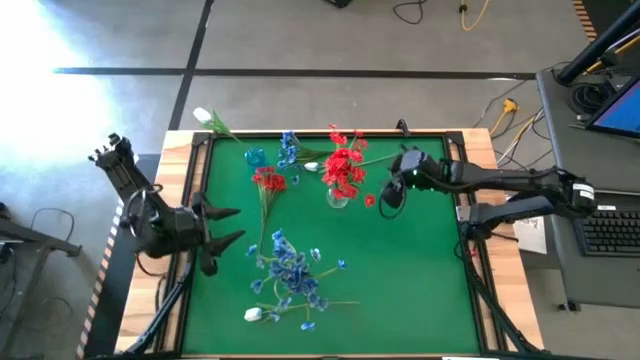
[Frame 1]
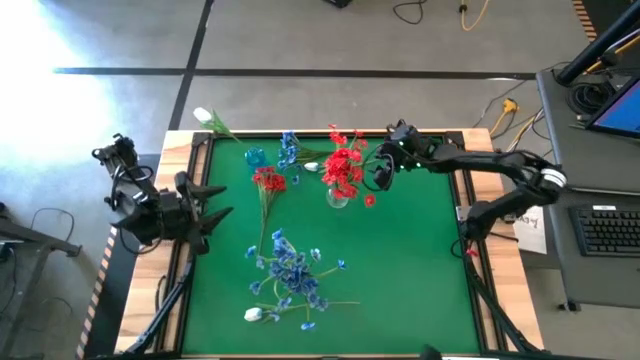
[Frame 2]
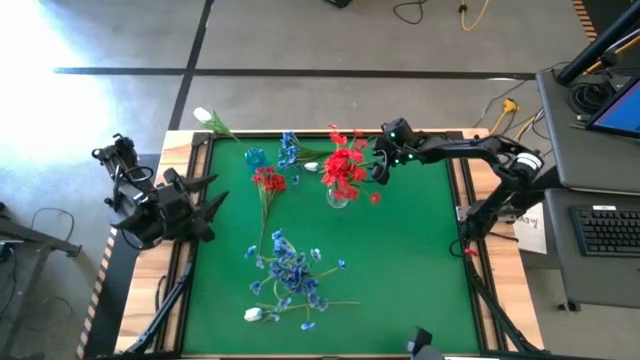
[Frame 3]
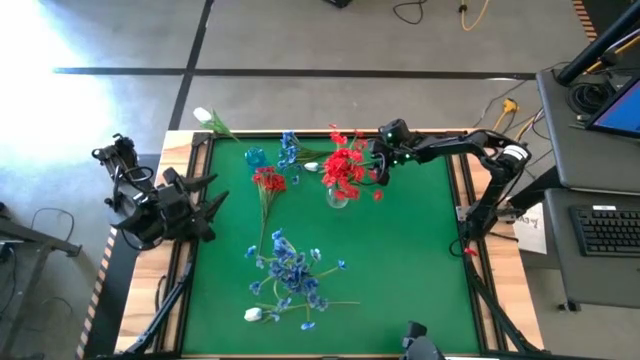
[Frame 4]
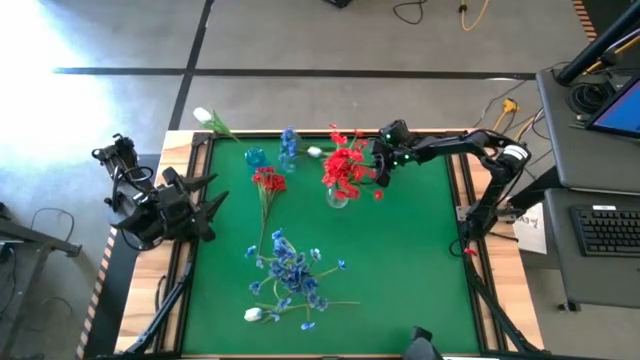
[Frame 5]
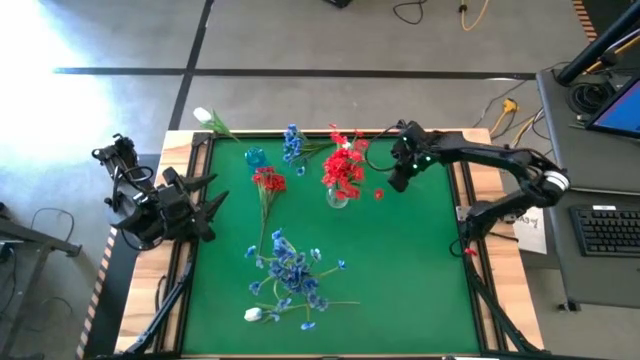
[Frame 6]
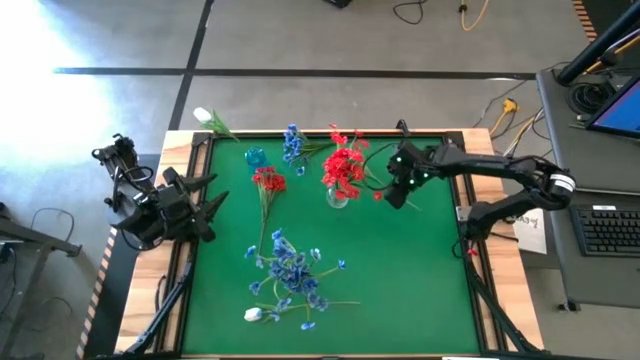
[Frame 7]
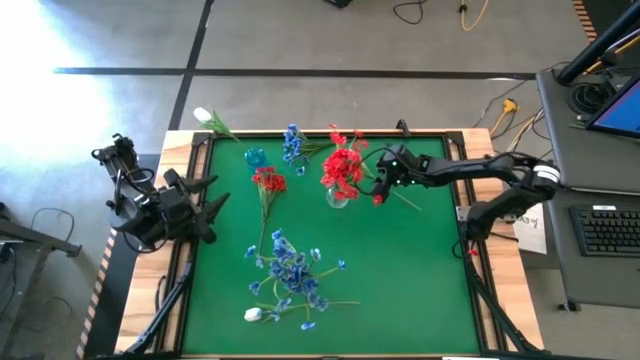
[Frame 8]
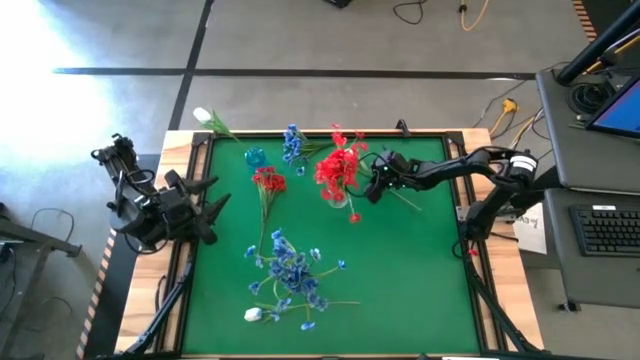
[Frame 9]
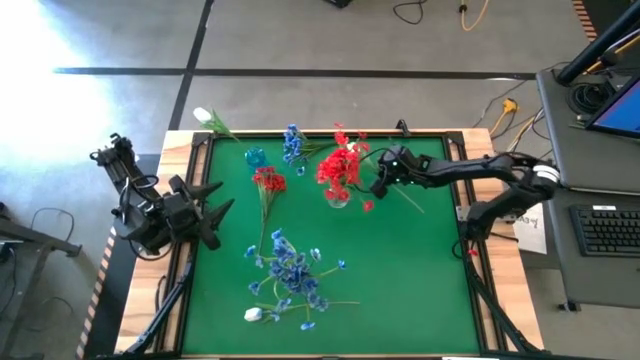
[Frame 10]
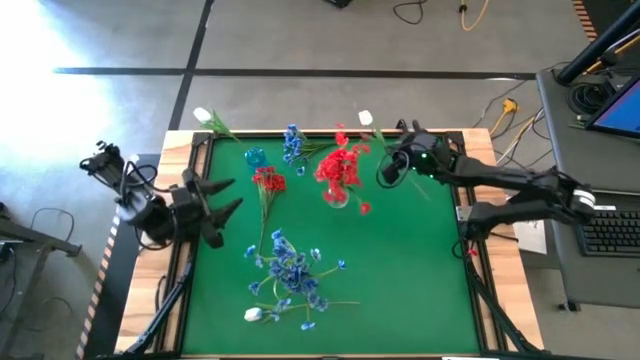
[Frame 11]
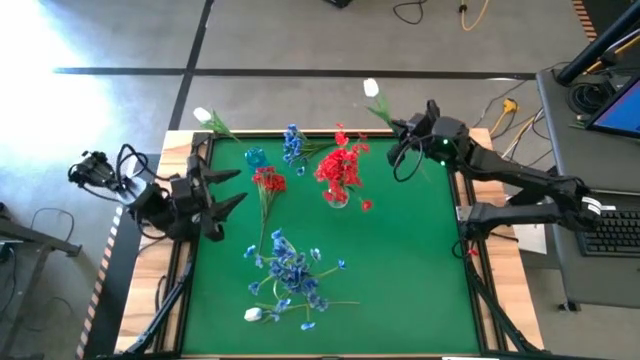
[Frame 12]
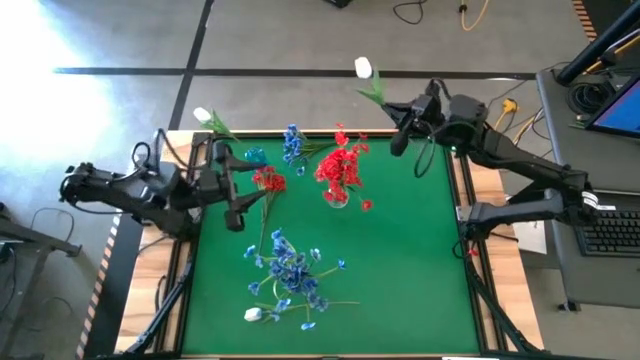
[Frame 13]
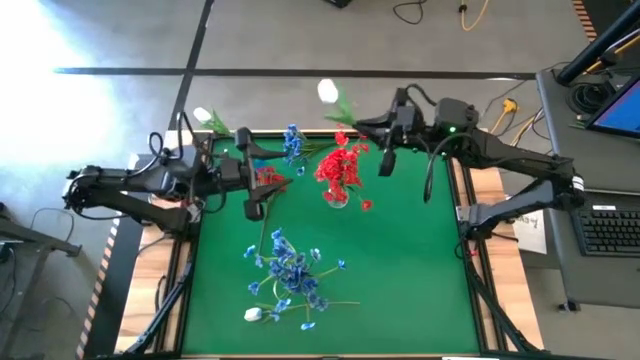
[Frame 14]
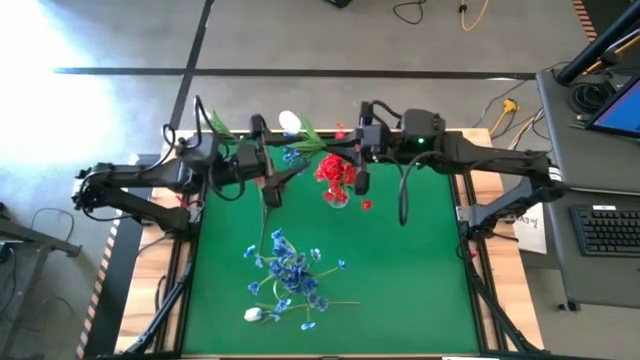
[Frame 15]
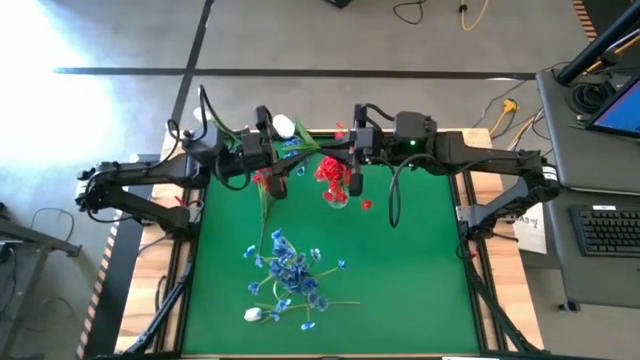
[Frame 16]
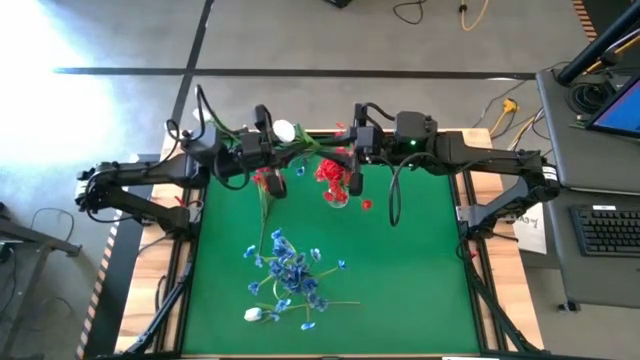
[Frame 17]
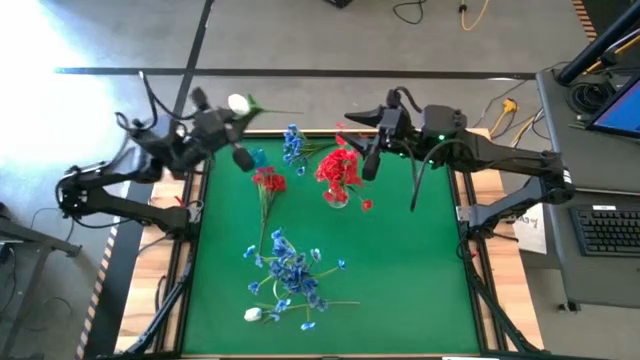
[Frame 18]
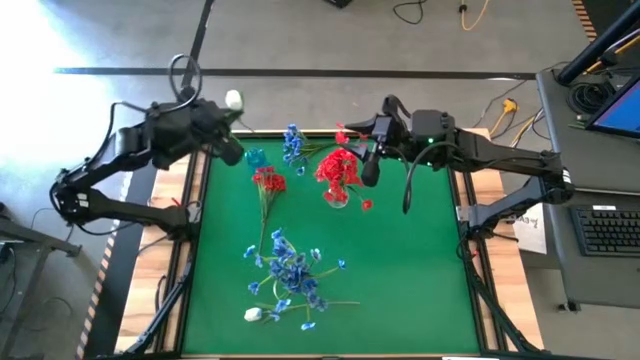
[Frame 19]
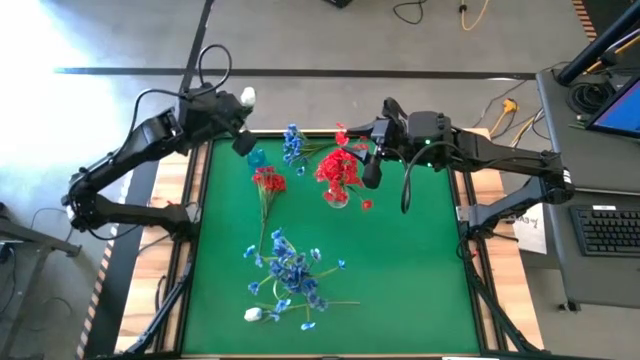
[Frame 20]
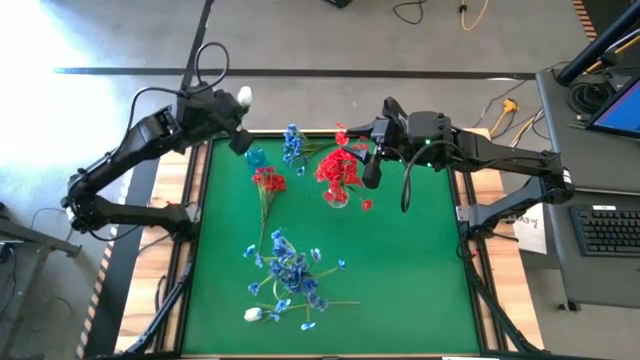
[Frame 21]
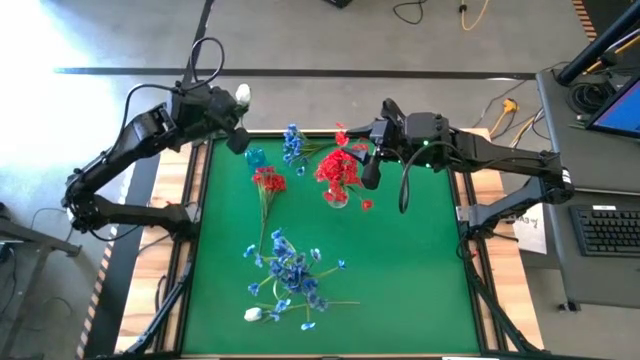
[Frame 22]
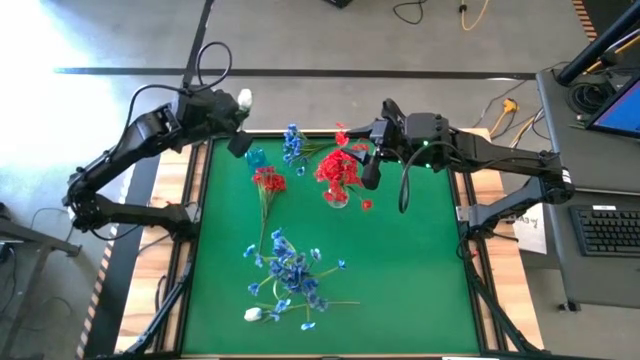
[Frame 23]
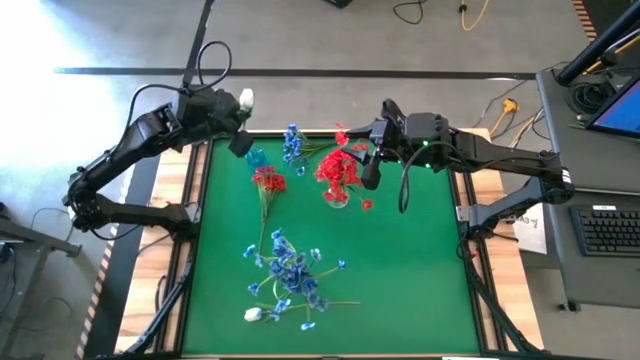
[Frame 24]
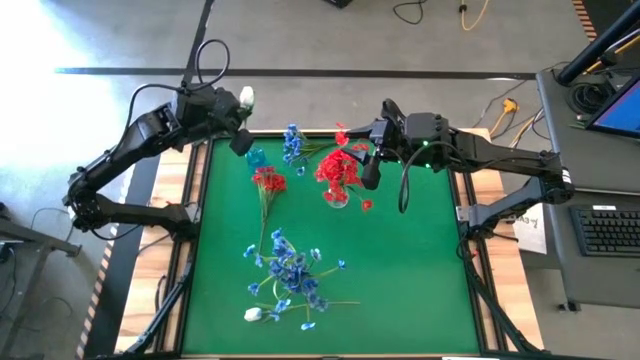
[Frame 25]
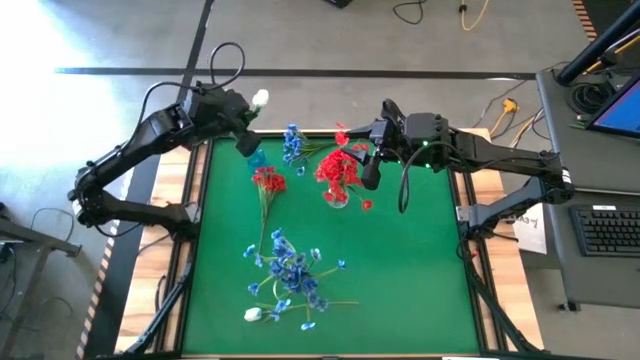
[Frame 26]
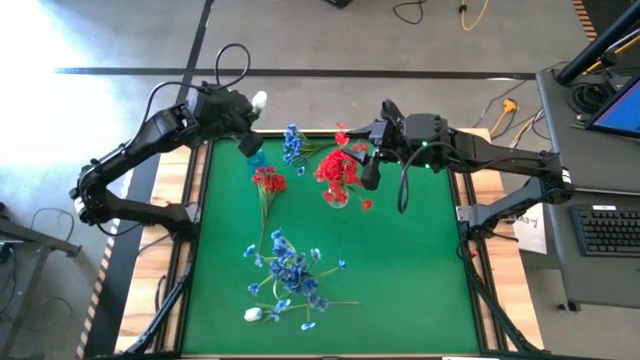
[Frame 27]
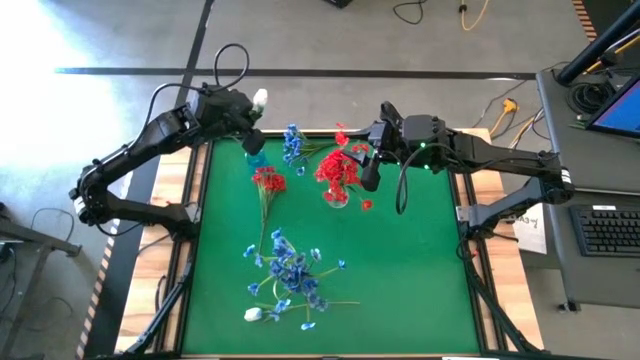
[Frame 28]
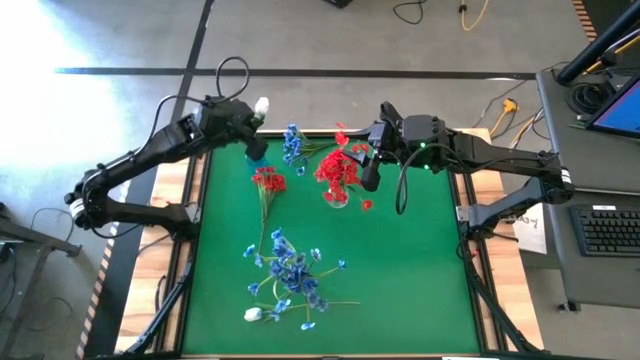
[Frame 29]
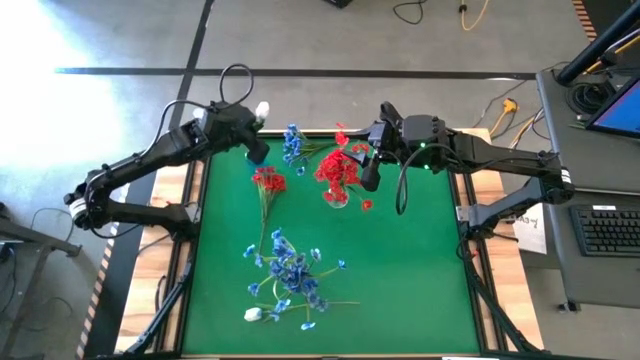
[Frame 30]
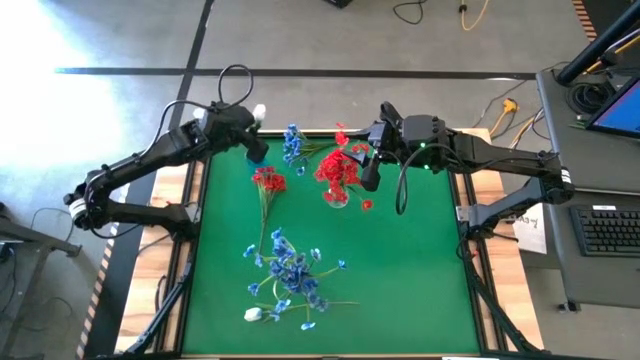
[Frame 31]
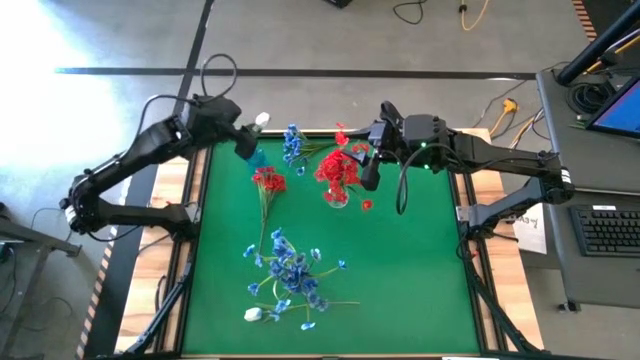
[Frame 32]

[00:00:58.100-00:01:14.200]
Task: Sort flowers into vase by color
Put the top white flower into the blue vase

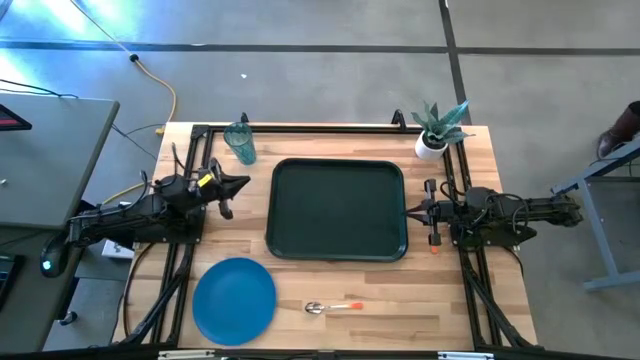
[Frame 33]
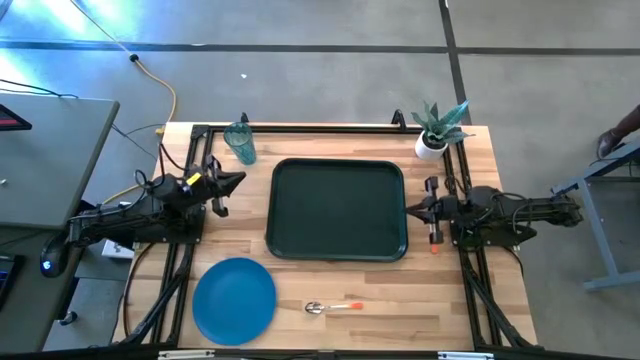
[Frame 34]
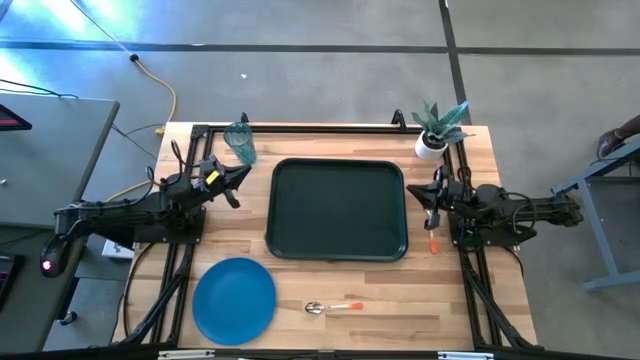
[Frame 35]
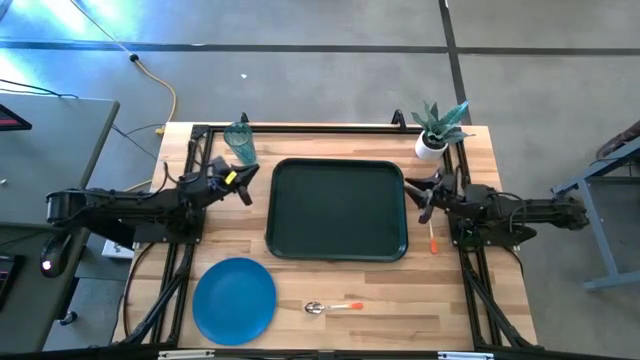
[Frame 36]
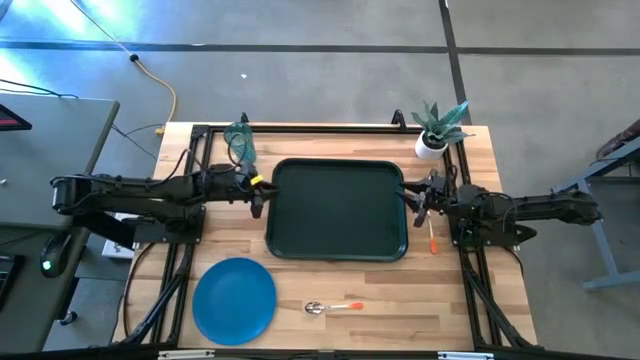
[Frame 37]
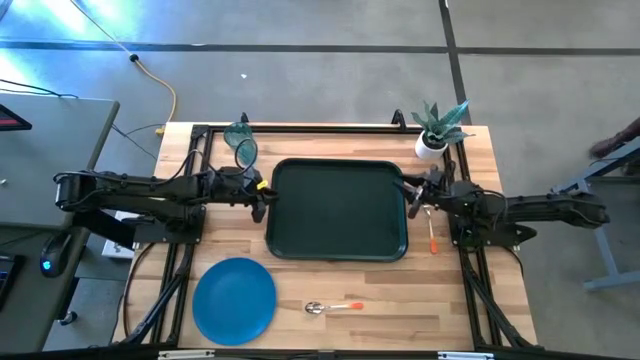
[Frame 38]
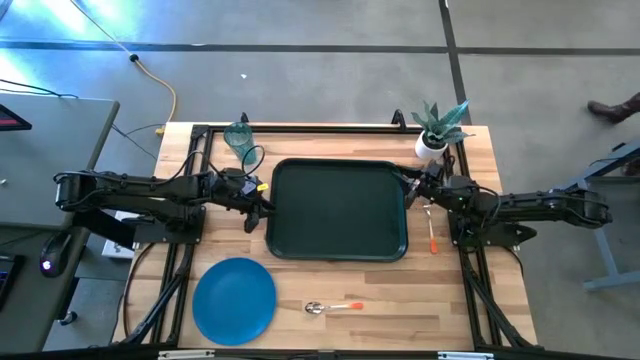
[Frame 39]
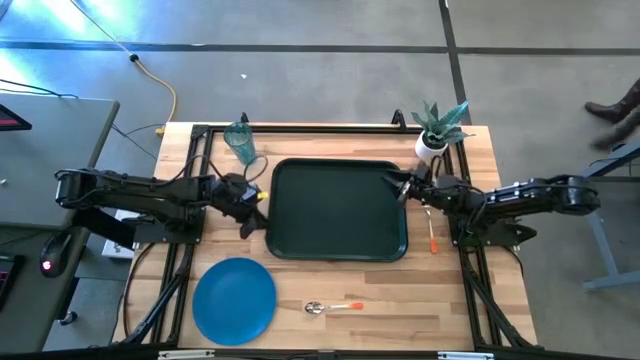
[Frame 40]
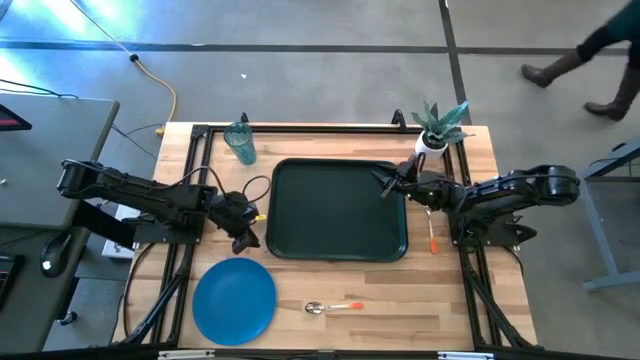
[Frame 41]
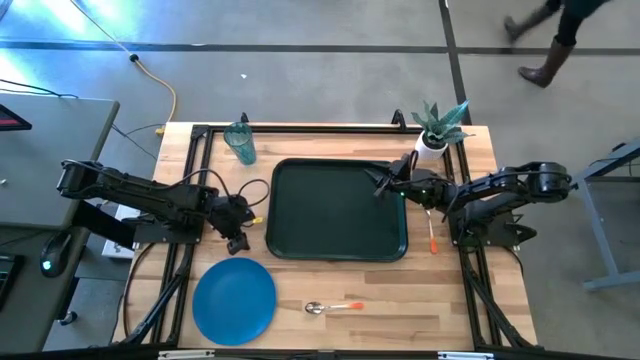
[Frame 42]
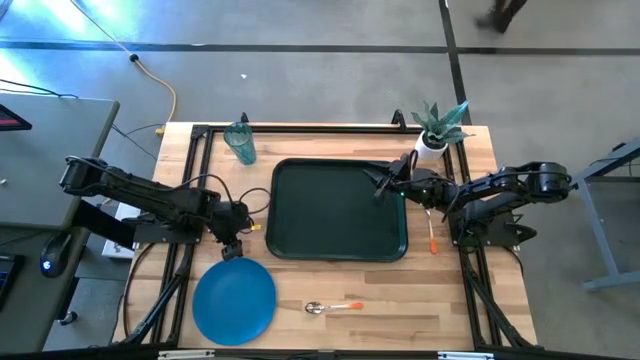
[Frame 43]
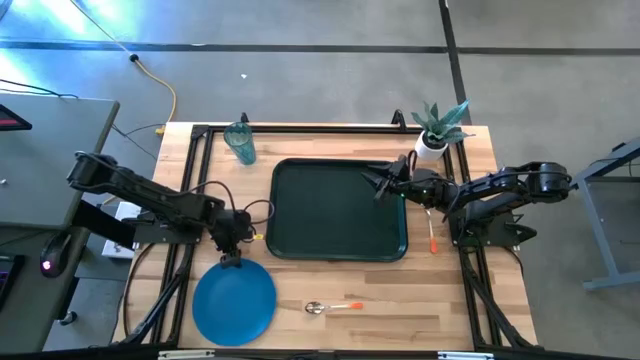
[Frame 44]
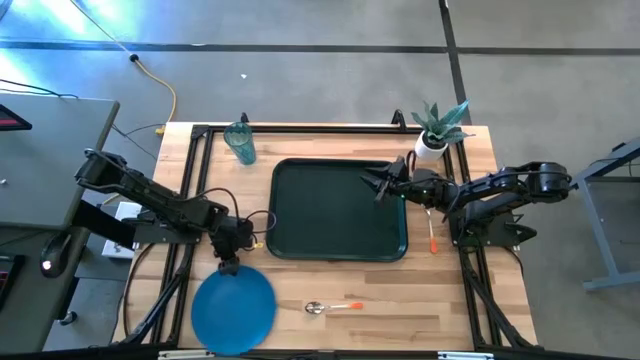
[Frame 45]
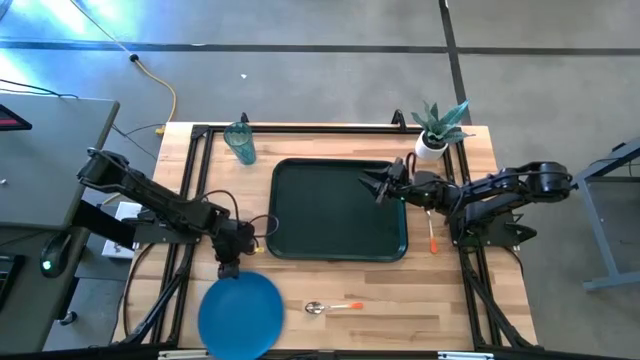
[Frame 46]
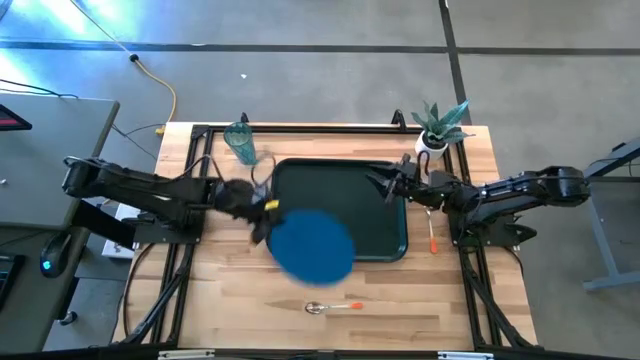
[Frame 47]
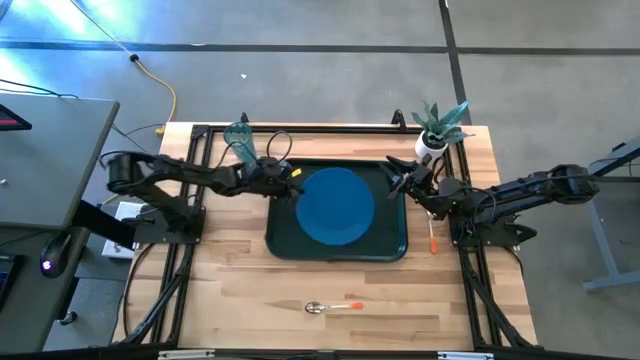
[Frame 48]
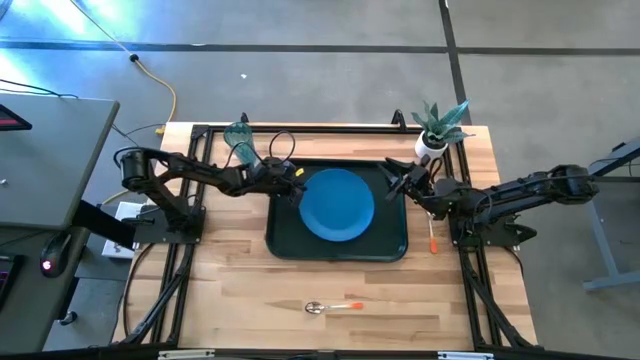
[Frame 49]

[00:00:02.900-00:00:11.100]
Task: Pick and place plate/cup/fork/spoon on tray
Put the blue plate on the dark green tray
